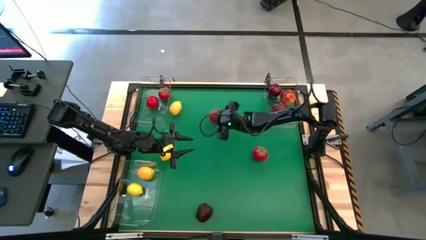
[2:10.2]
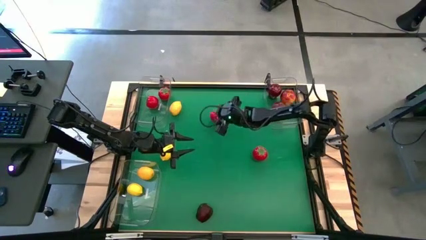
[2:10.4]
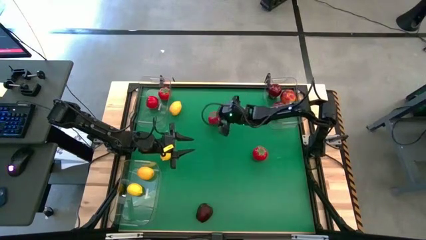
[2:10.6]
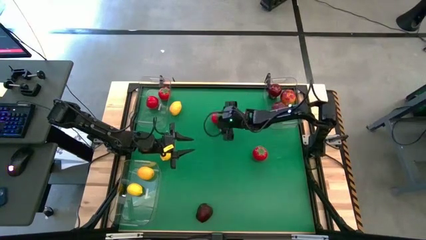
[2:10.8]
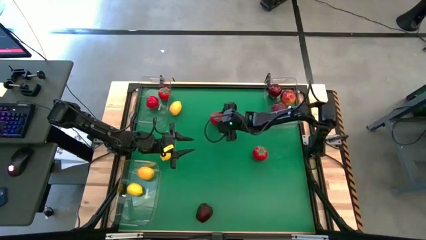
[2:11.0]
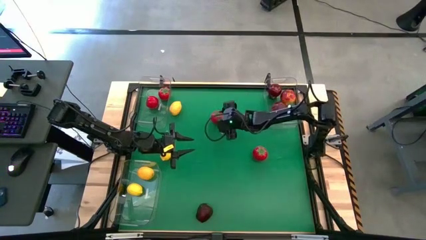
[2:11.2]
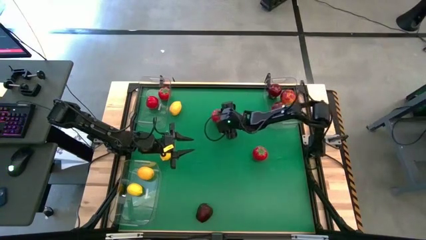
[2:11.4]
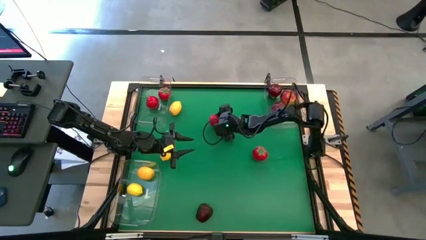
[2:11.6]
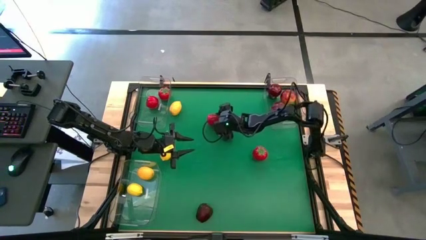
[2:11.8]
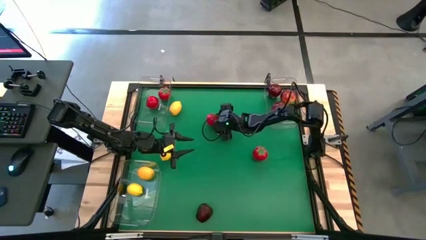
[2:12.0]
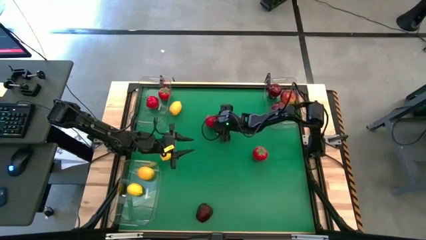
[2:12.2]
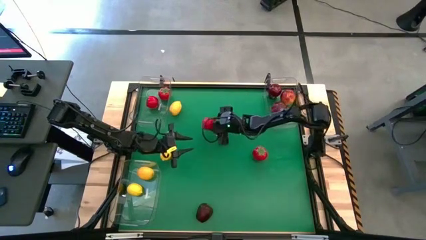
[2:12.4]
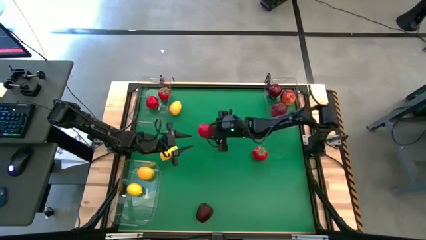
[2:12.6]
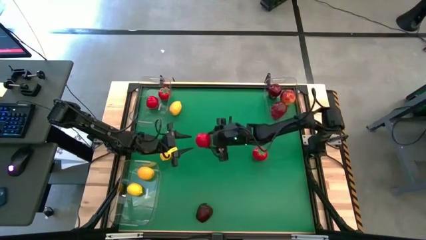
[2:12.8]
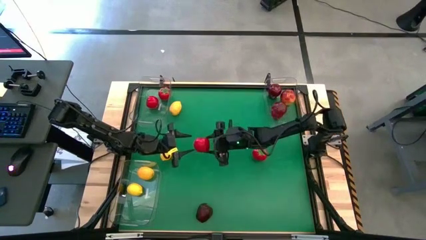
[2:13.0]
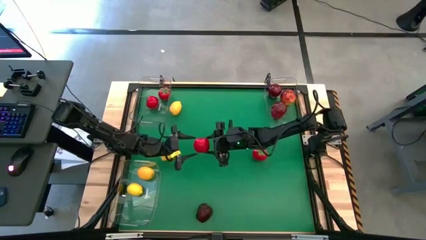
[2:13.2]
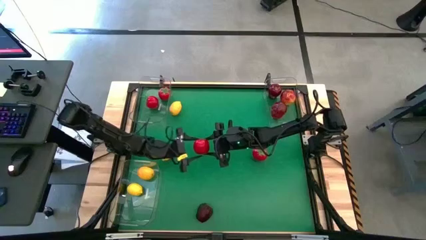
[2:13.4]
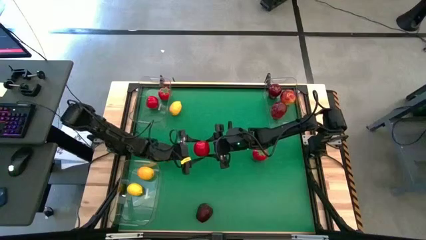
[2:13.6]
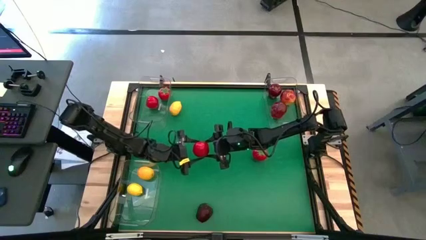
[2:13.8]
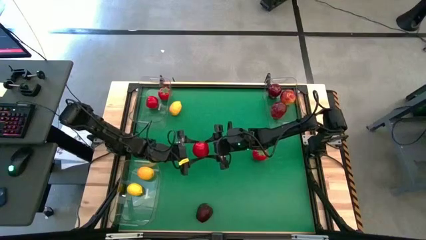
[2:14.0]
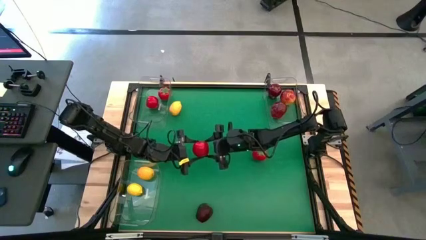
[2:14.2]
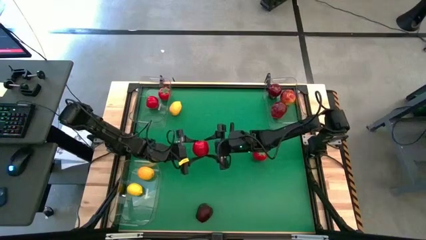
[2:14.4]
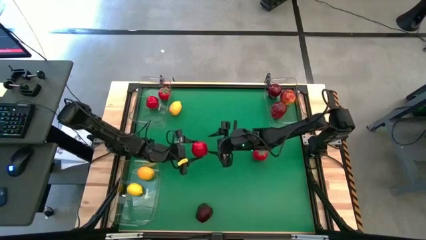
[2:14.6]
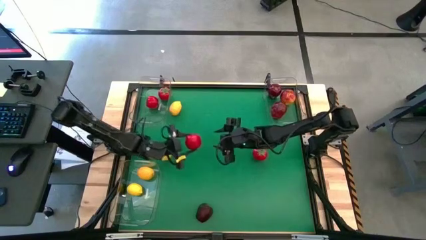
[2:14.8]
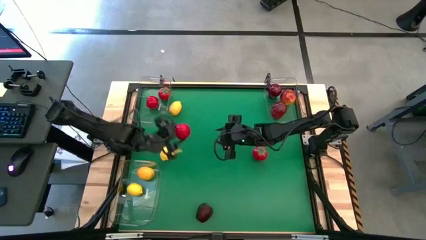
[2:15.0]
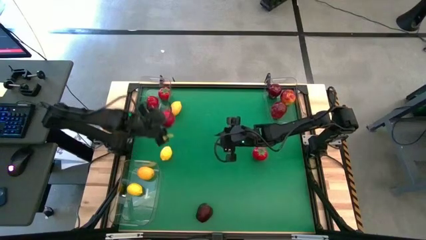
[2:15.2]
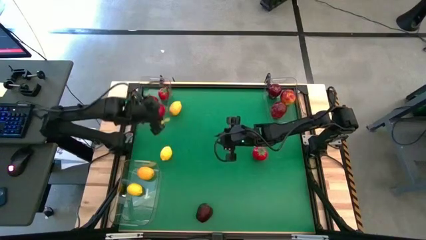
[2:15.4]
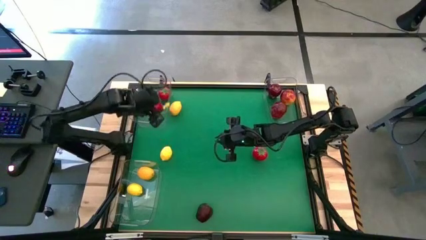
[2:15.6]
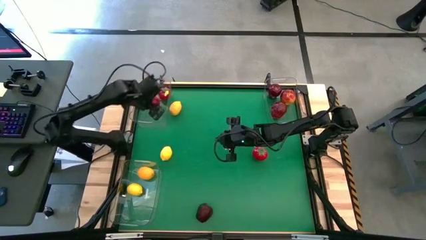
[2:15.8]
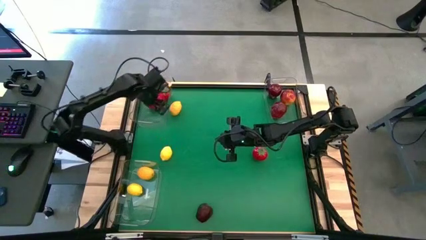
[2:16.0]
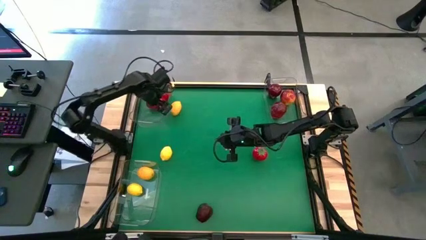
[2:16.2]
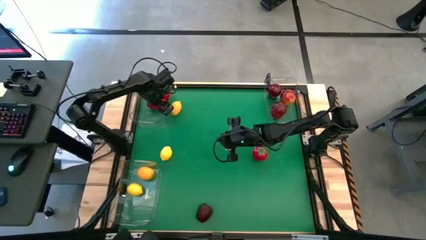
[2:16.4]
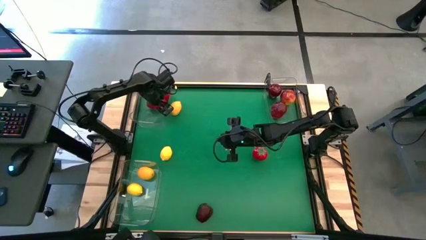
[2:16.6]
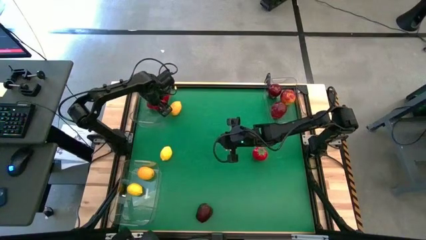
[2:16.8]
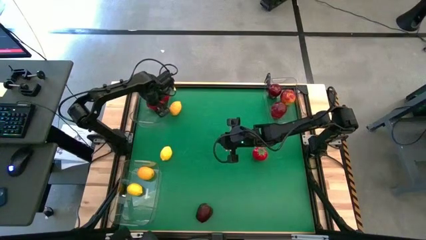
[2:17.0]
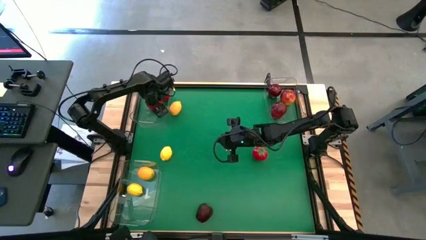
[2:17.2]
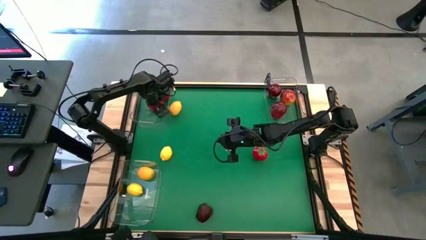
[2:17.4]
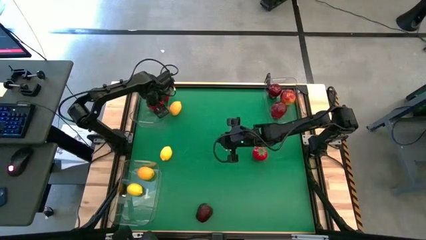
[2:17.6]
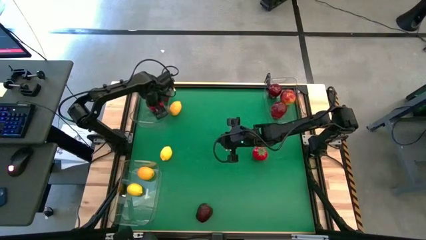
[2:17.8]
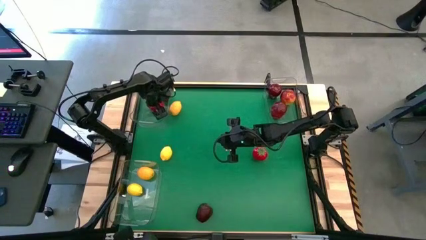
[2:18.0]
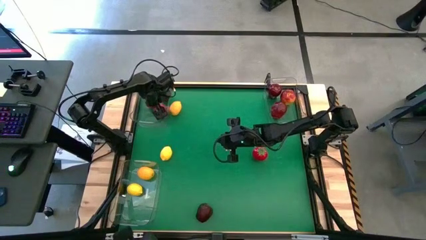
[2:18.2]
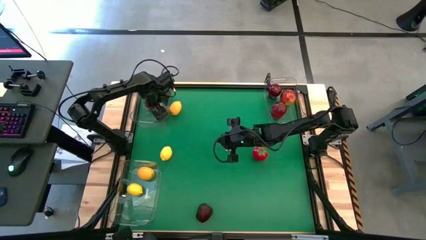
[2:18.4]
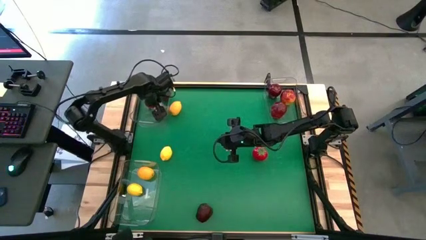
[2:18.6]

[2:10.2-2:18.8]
Task: Sort produce into baskets
Put the tomato into the top left bin

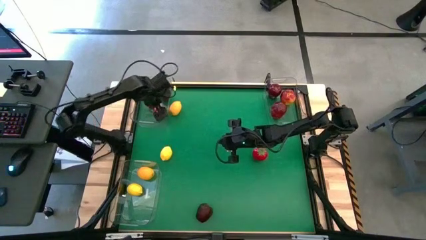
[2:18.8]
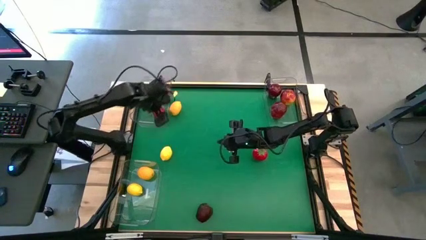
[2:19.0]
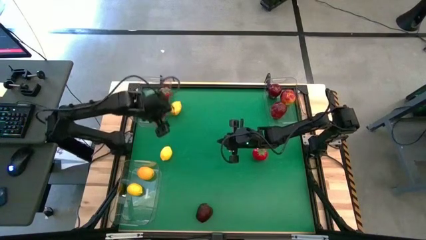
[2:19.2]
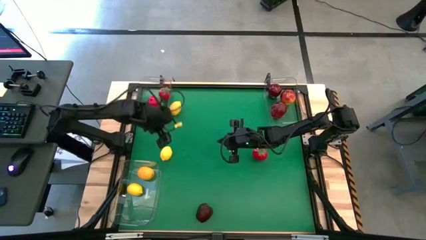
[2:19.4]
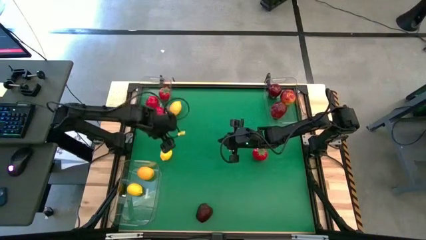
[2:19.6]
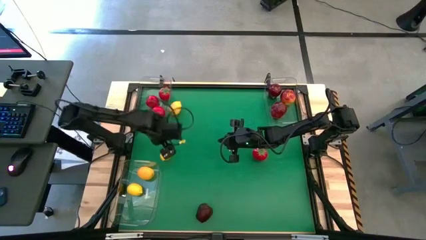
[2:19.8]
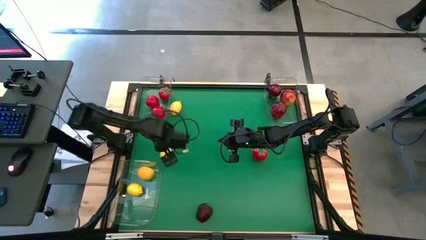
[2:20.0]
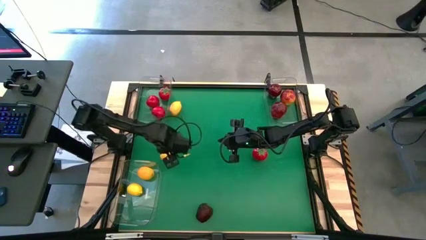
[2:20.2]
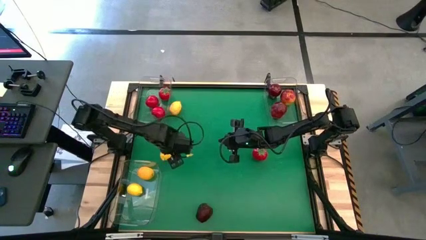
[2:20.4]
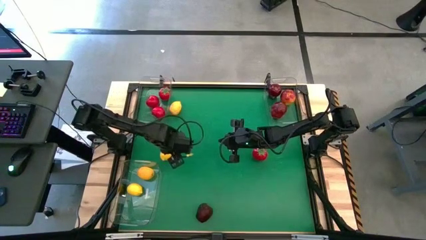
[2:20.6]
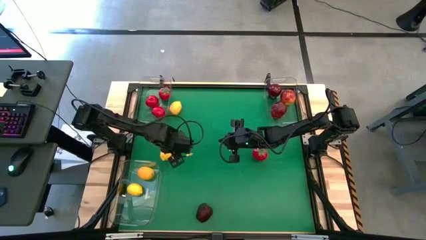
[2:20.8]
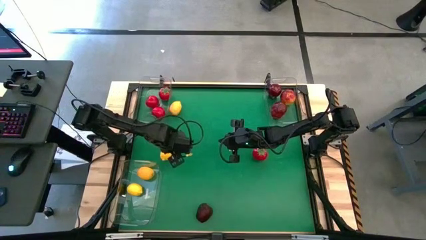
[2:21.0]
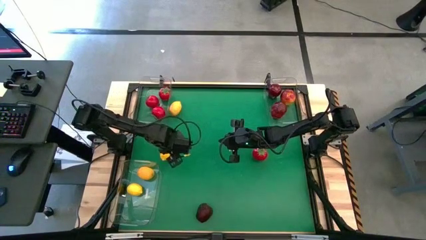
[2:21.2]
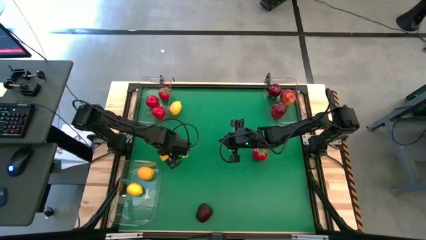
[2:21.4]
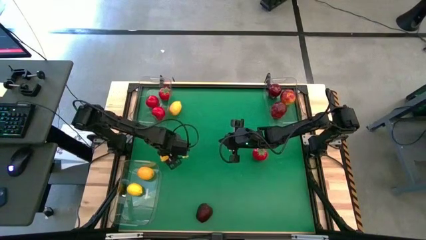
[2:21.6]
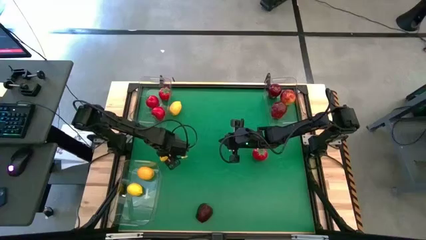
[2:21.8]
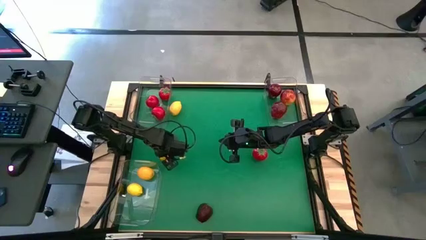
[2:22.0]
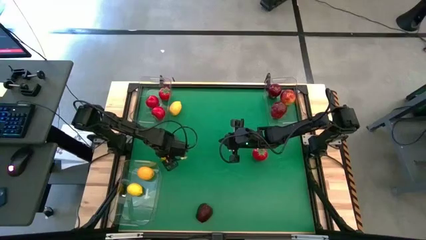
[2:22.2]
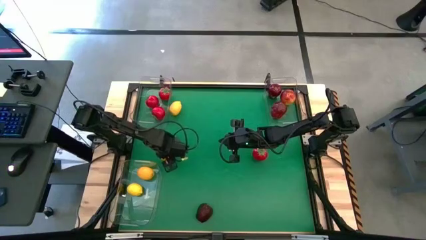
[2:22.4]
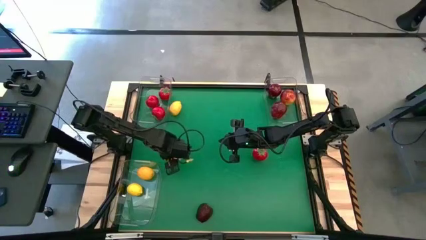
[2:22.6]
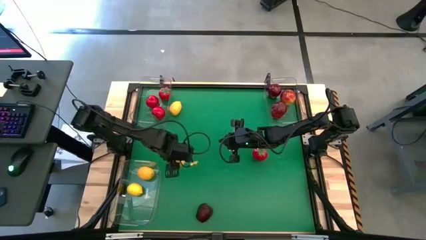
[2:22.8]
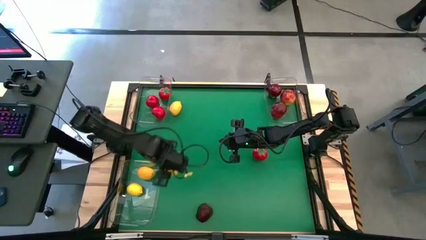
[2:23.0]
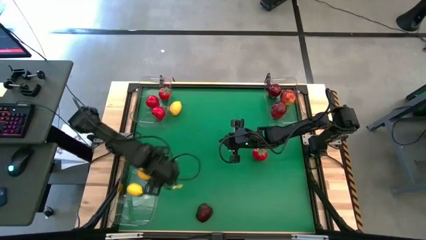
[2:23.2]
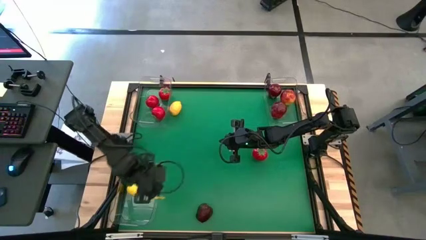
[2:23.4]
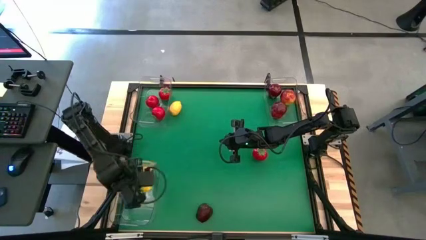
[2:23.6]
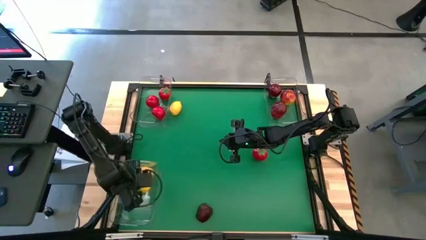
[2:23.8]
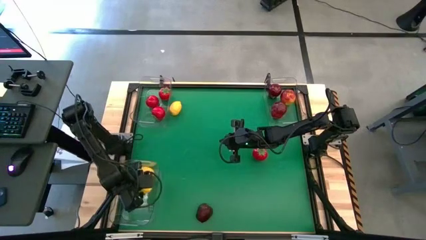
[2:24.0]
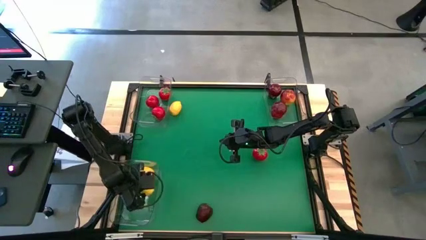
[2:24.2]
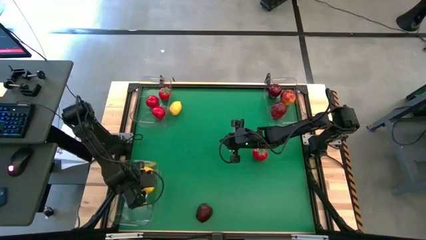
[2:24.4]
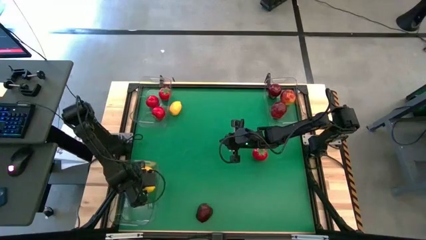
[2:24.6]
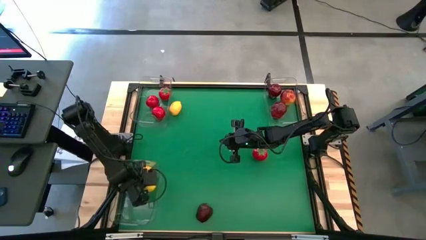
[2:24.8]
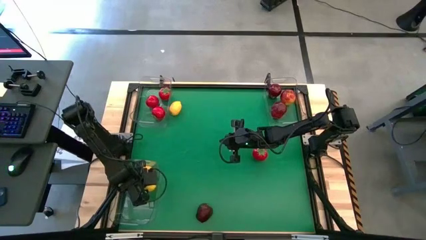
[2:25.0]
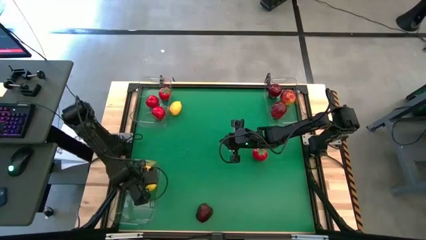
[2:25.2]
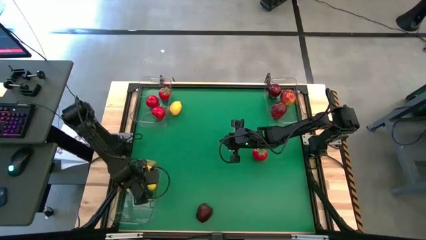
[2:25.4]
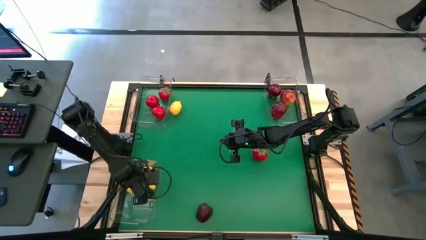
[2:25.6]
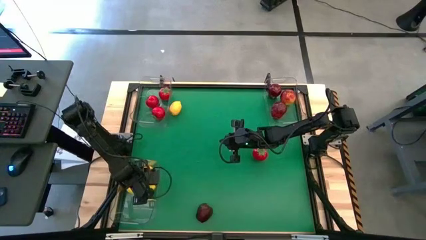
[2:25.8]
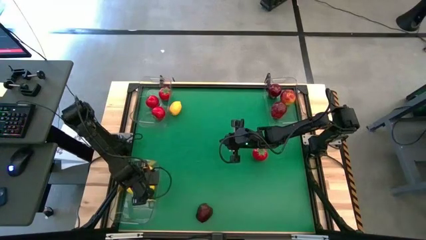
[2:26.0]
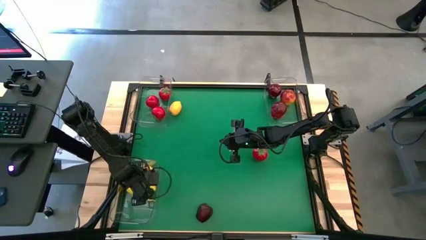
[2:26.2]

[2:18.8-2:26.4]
Put the lemon into the bottom bin
